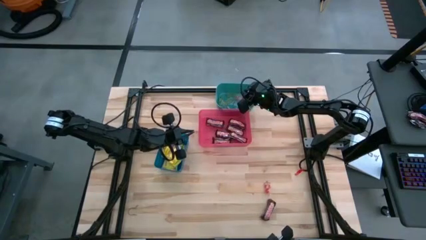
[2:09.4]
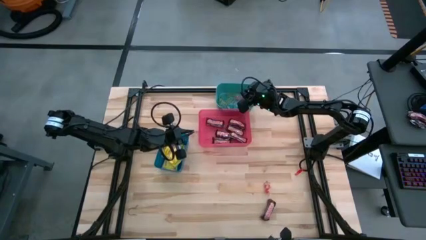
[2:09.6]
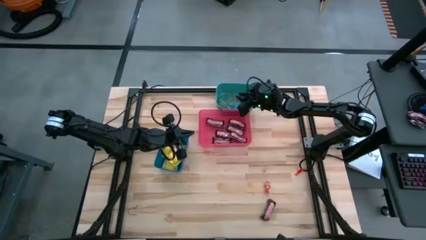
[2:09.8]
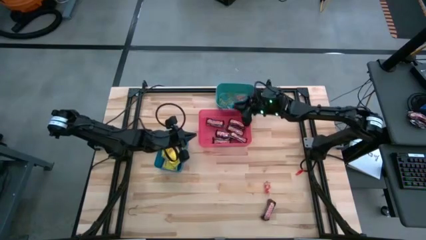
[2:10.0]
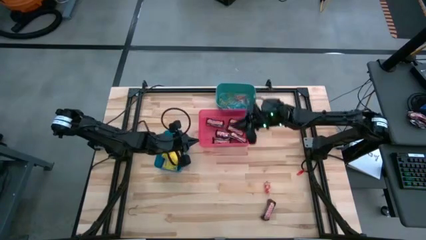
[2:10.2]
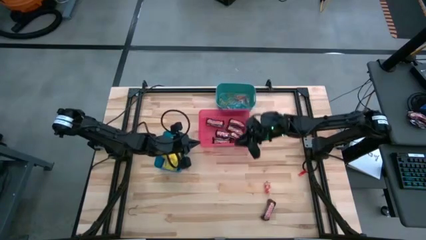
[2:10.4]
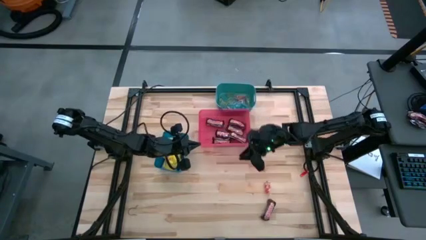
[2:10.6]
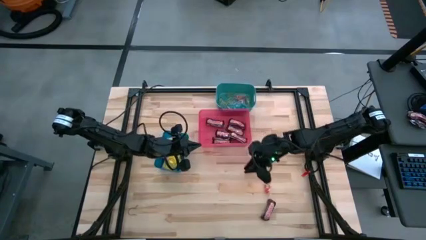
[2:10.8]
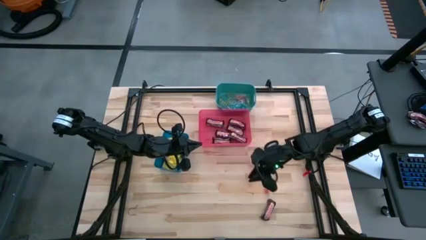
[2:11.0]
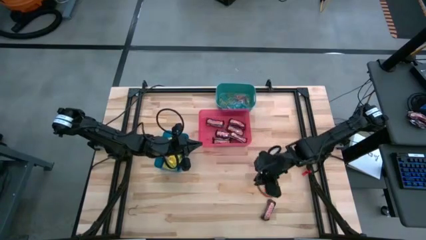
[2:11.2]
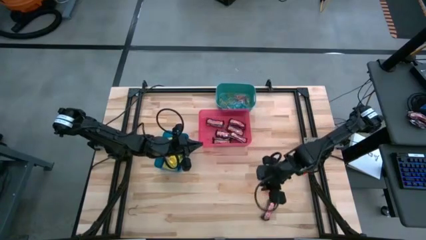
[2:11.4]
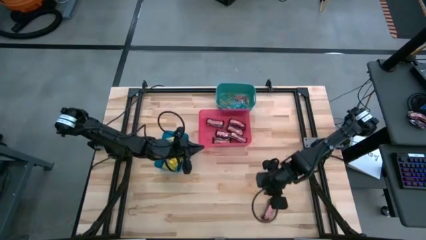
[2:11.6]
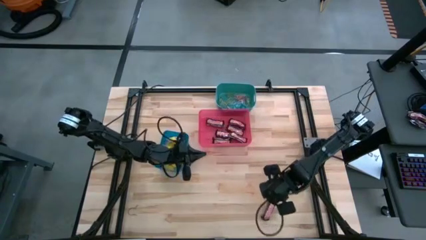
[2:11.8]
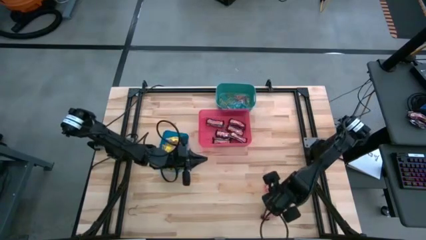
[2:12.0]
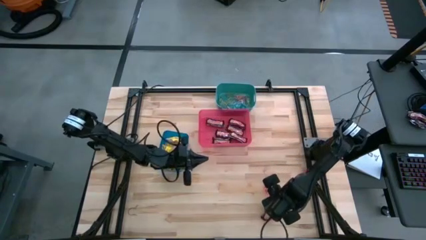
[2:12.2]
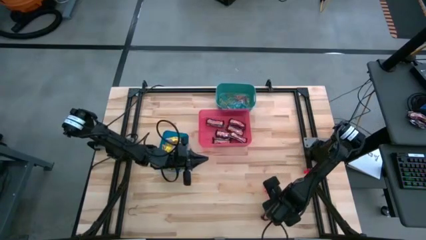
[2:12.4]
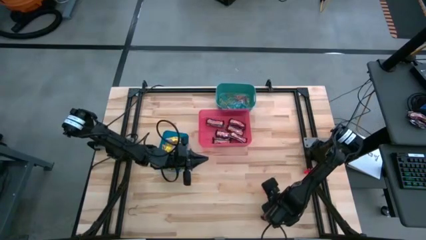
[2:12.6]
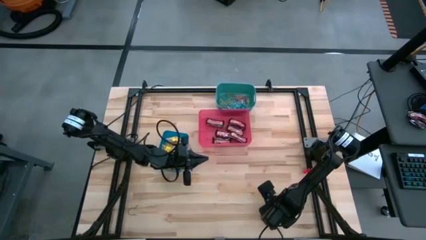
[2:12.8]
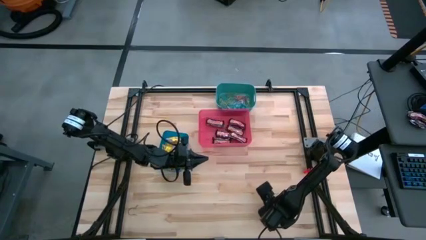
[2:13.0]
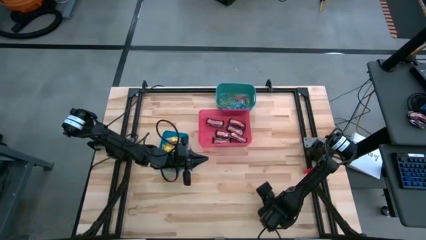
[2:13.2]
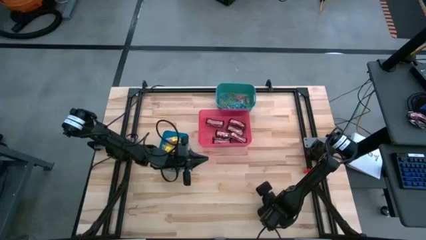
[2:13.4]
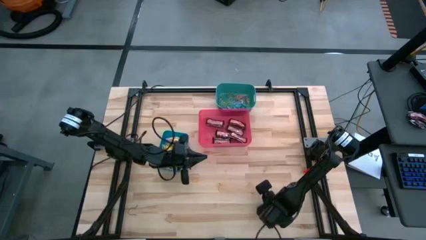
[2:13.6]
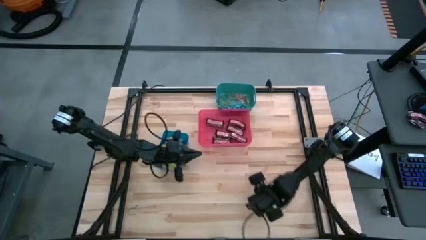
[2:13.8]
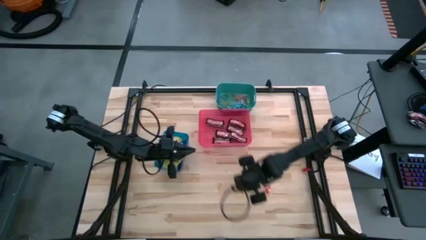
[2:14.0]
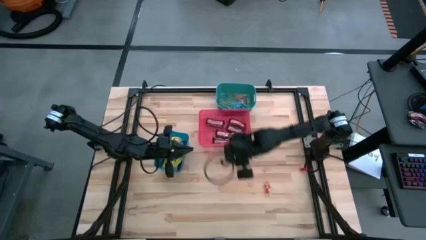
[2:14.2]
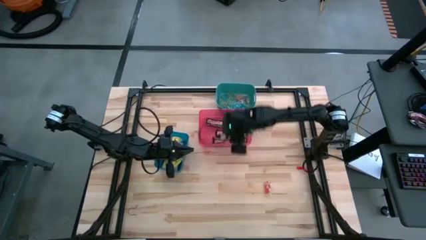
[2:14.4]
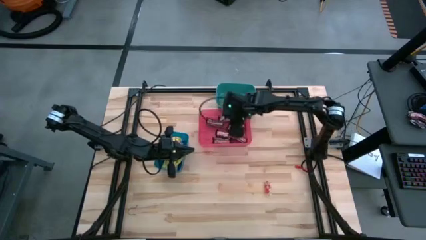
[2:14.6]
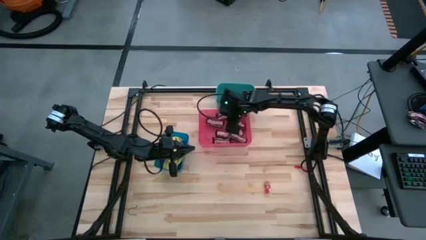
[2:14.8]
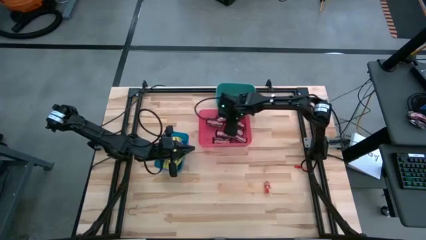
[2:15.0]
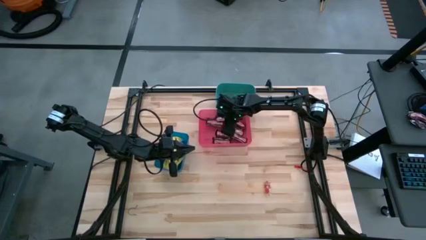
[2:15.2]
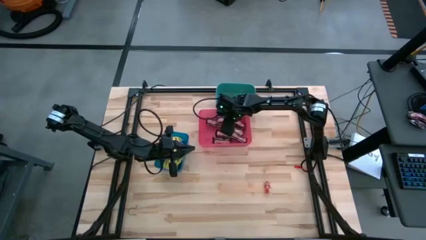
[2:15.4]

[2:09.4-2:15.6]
Task: Sort candy
Put the brown chocolate bar into the red bin

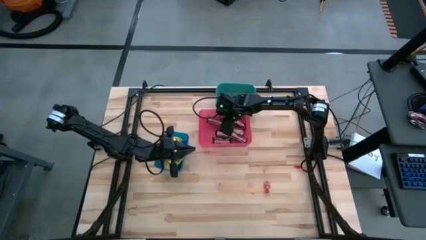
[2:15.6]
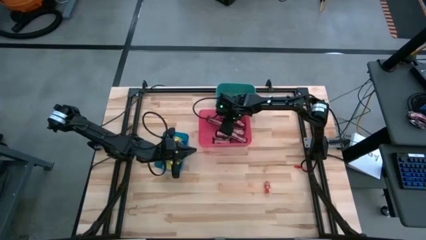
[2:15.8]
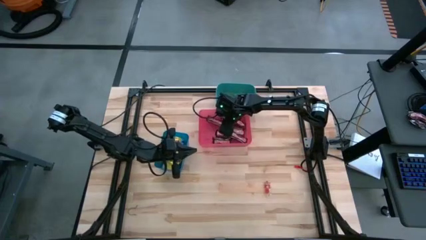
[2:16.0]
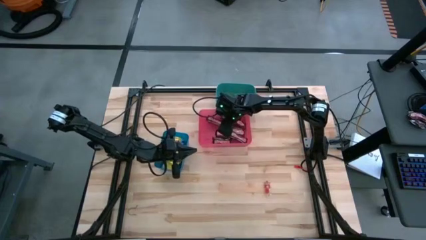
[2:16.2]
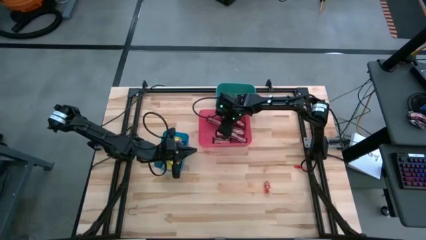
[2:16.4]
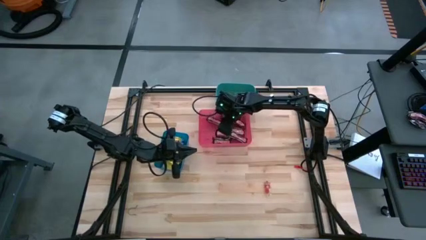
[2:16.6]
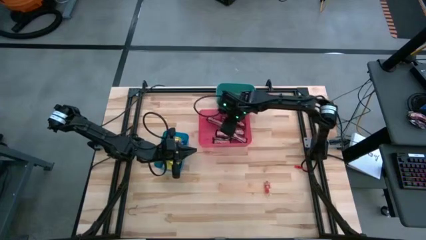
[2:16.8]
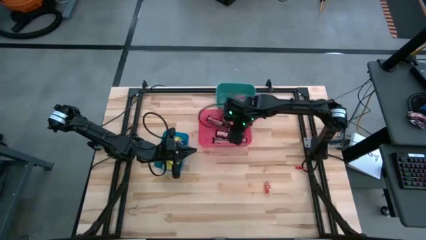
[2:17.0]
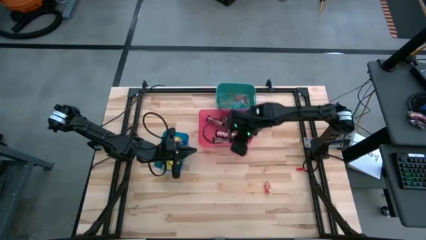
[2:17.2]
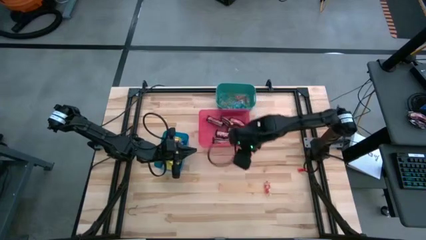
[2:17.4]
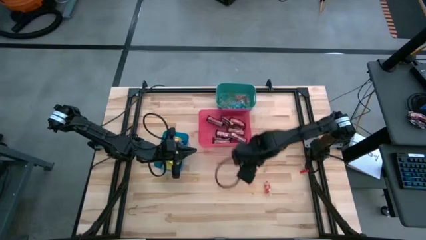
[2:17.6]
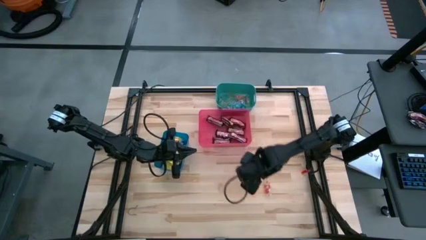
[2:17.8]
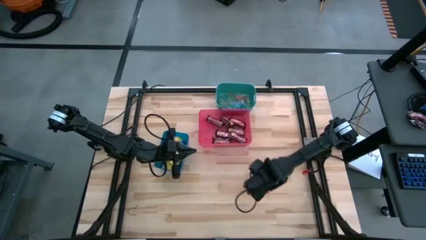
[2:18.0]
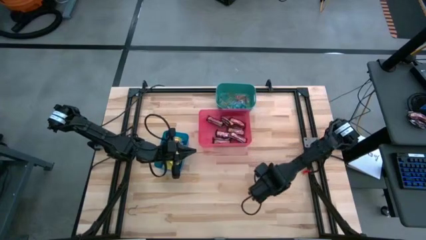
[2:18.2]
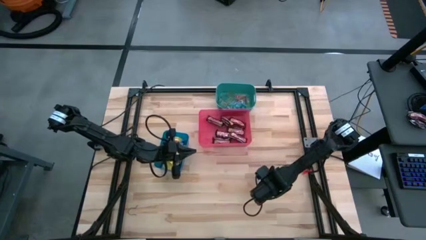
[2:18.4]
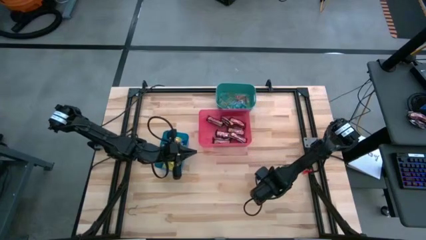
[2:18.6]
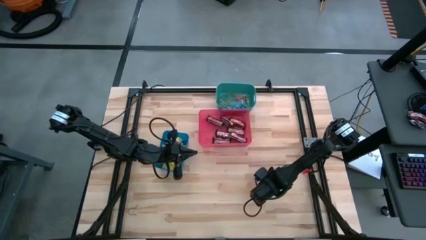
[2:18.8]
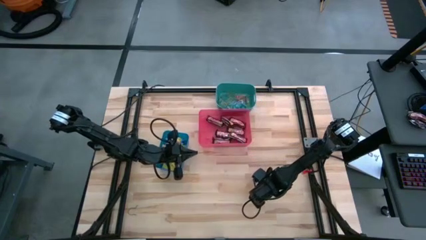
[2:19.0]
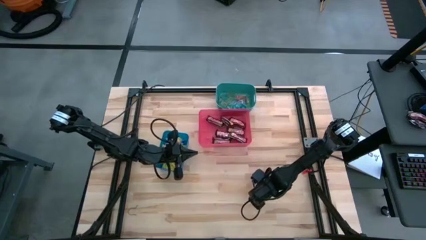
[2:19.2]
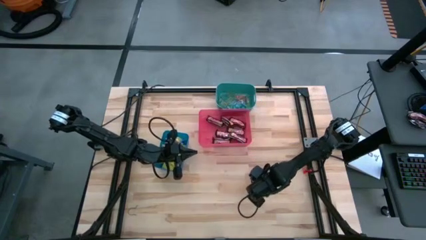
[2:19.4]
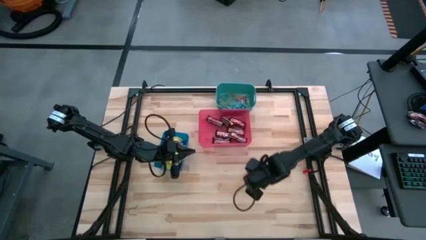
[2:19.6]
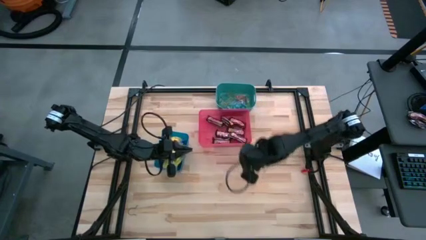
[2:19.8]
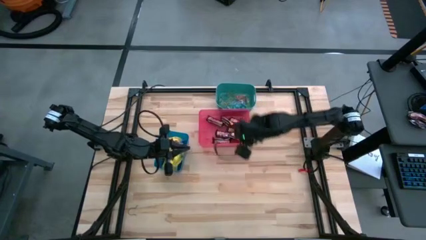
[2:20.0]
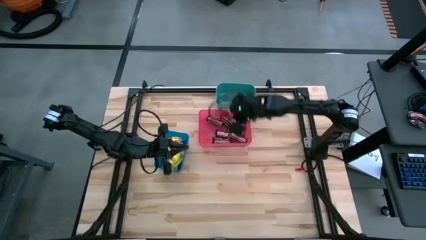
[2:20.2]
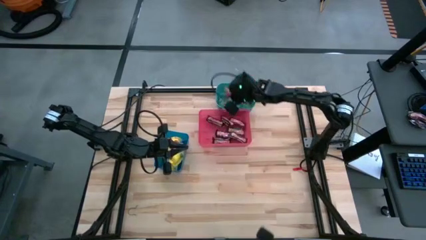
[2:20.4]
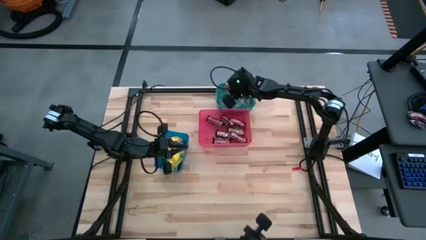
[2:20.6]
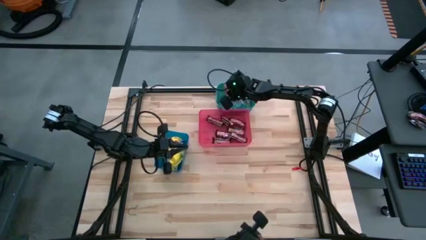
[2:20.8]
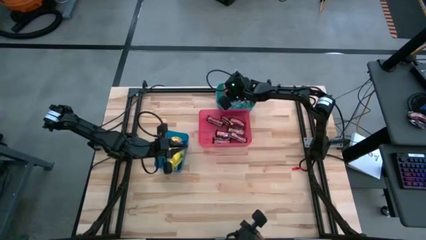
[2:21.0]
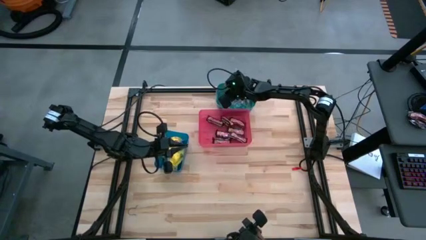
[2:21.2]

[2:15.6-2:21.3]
Put the orange gummy into the green bin

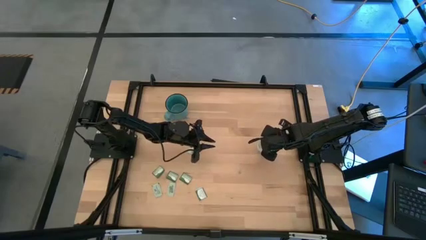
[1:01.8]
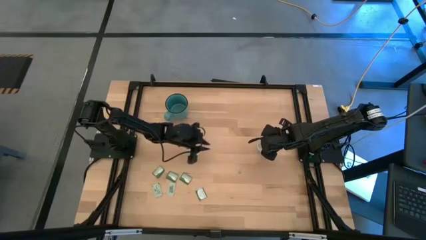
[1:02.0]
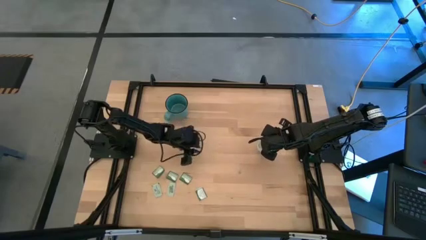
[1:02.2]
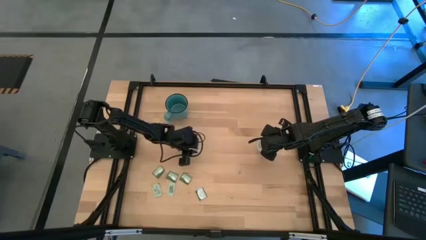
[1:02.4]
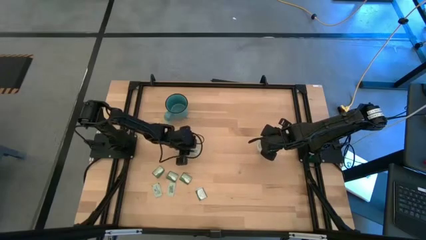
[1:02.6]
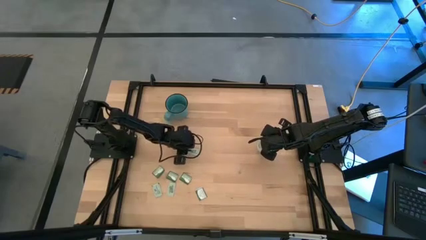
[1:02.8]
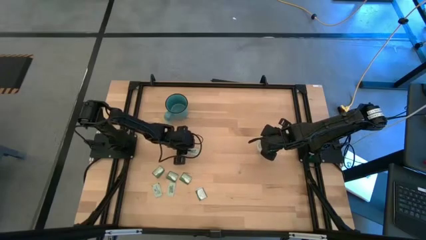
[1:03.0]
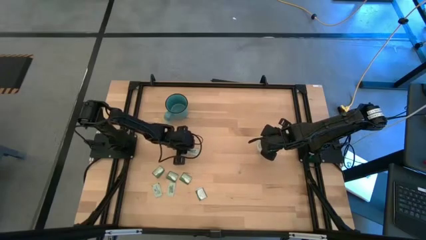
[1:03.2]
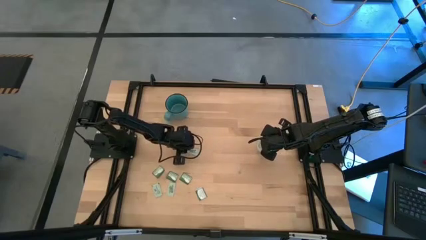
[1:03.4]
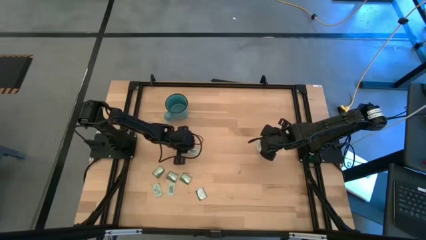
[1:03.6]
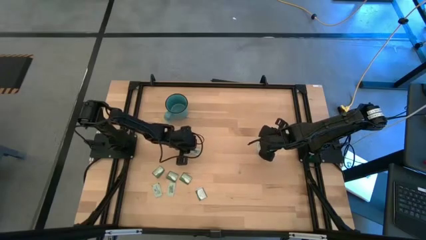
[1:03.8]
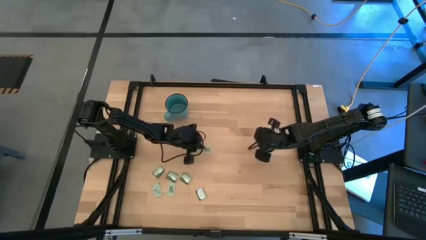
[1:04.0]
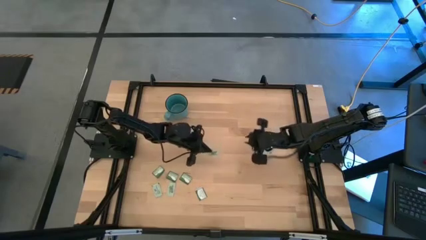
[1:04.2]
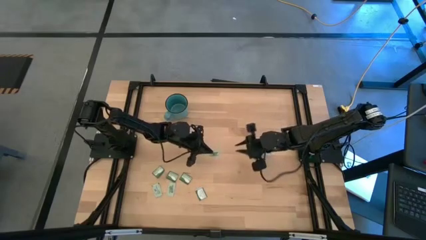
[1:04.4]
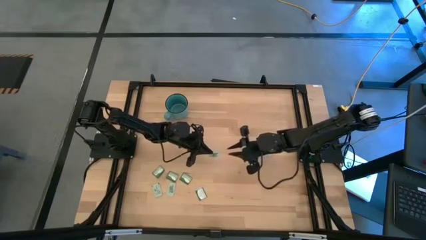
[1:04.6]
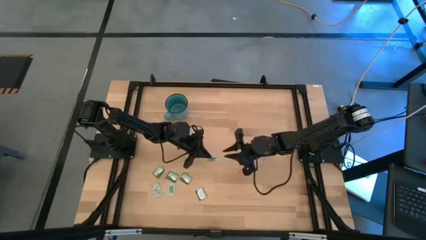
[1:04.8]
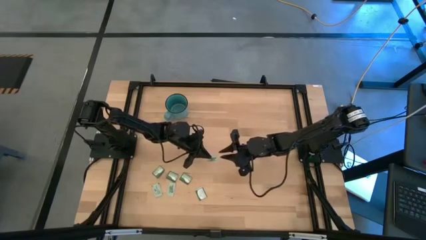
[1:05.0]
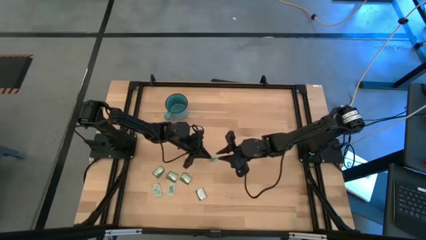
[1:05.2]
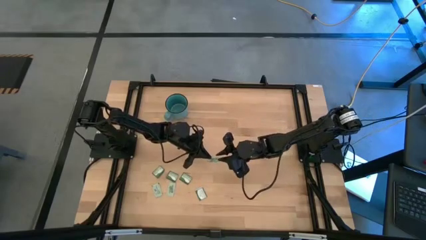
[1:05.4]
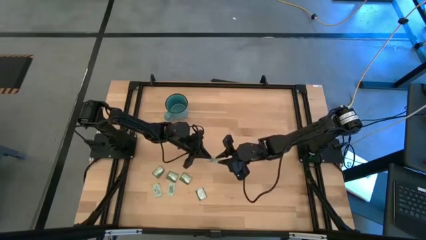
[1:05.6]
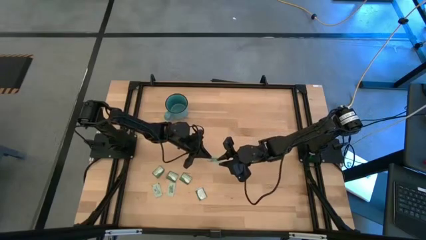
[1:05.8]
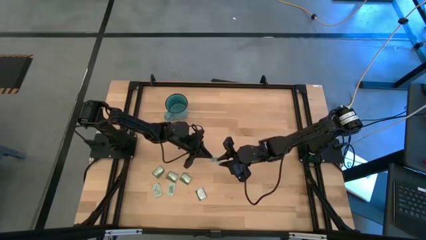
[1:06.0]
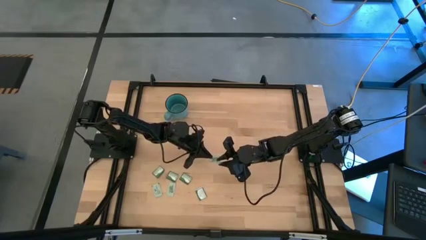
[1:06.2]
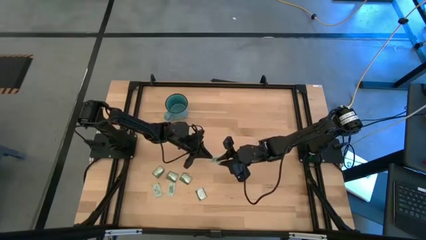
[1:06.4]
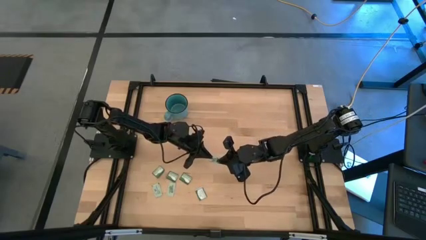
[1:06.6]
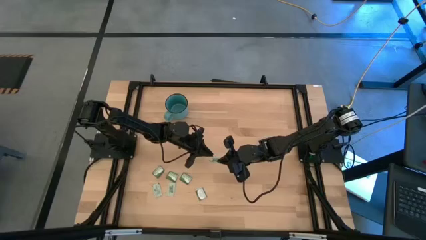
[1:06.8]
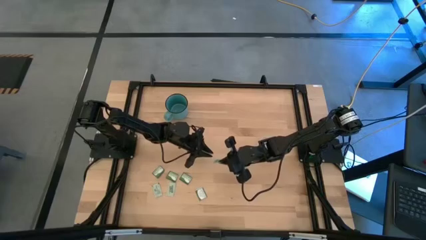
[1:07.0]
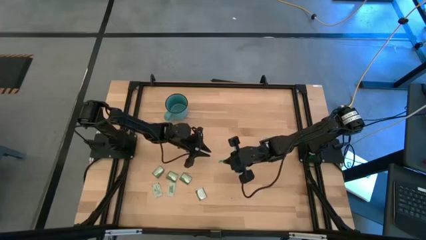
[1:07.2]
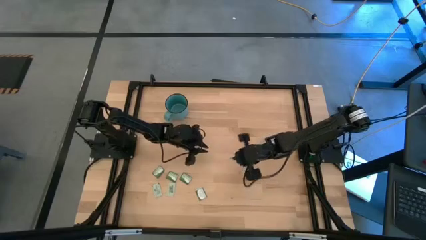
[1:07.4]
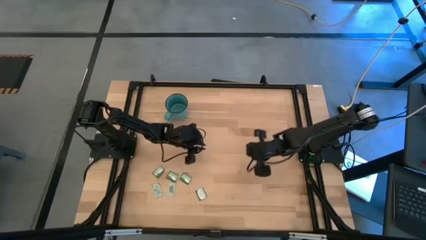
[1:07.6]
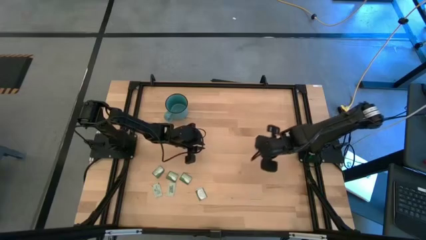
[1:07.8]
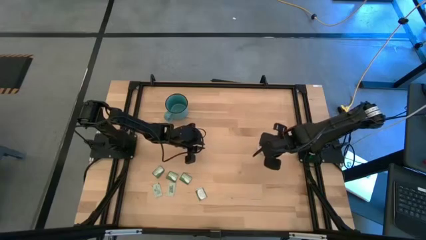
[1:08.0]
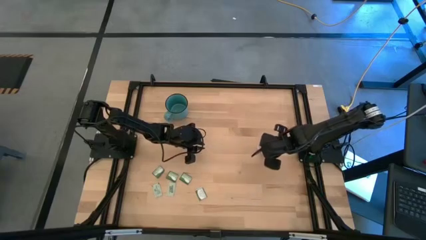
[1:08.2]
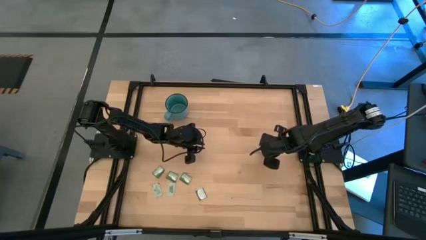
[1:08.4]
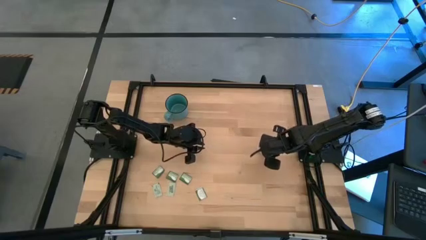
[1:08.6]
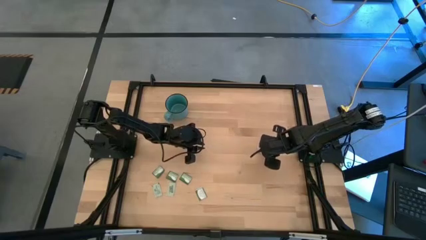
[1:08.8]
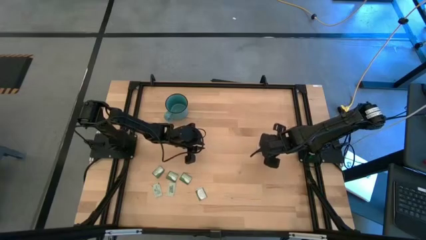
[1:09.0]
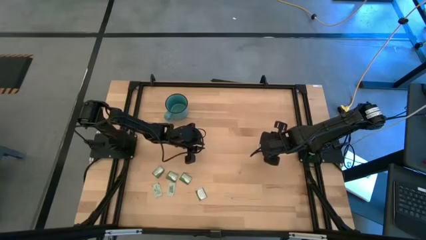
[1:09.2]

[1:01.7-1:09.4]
Task: Pick and place Stevia / Truvia into bins
Put the stevia packet into the transparent bin
